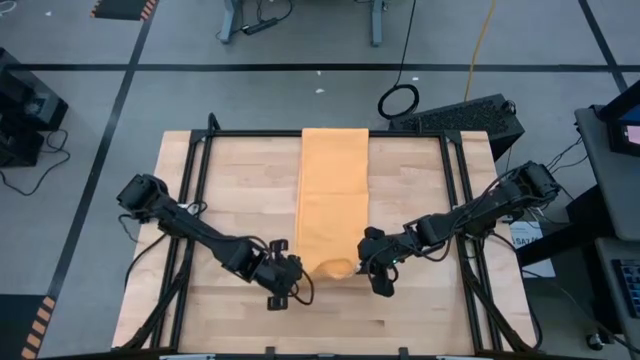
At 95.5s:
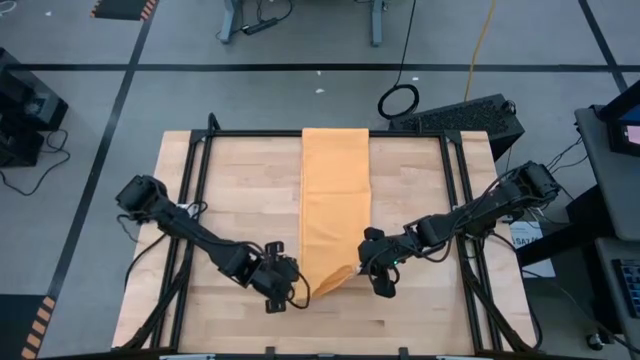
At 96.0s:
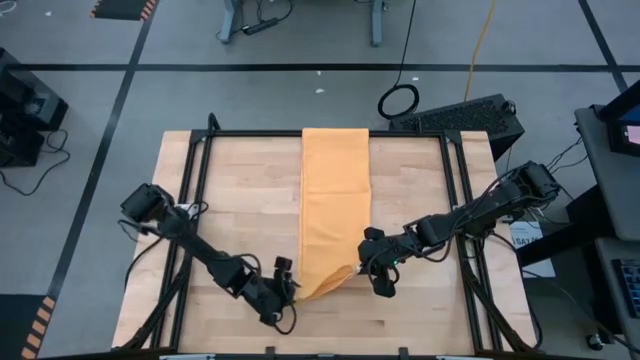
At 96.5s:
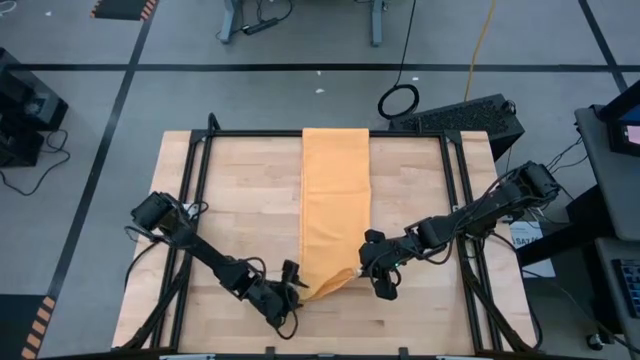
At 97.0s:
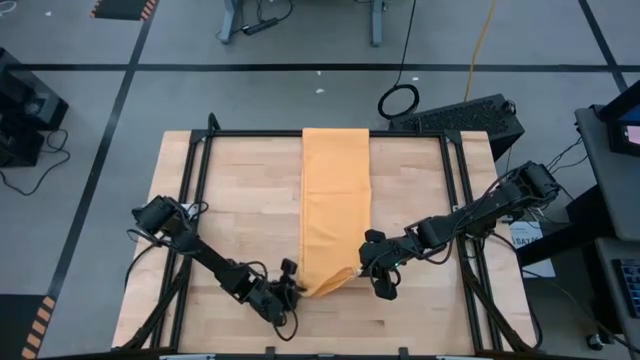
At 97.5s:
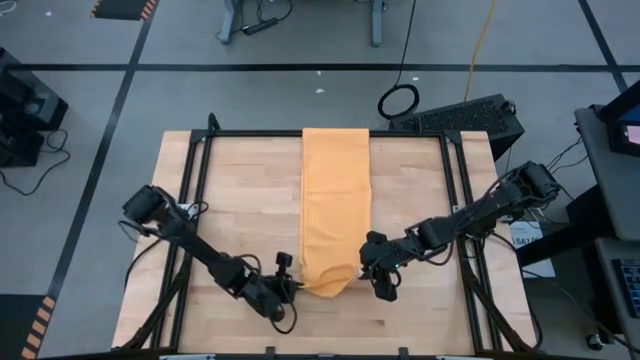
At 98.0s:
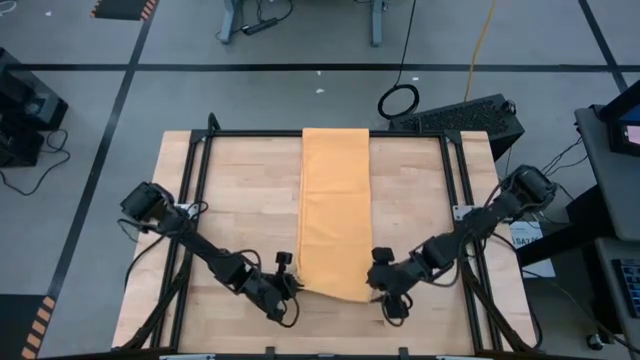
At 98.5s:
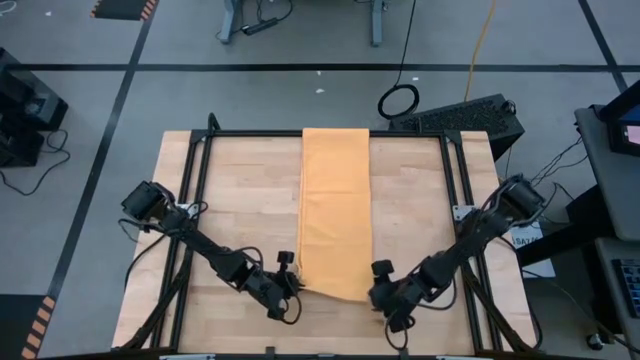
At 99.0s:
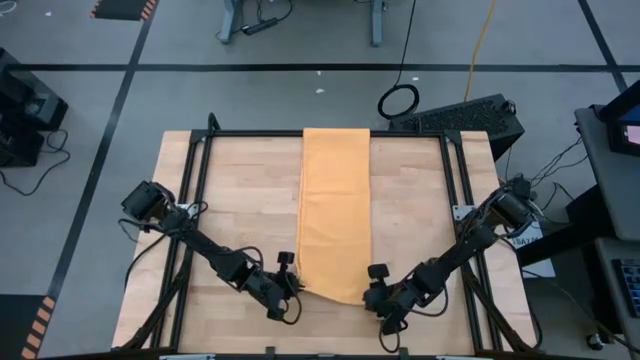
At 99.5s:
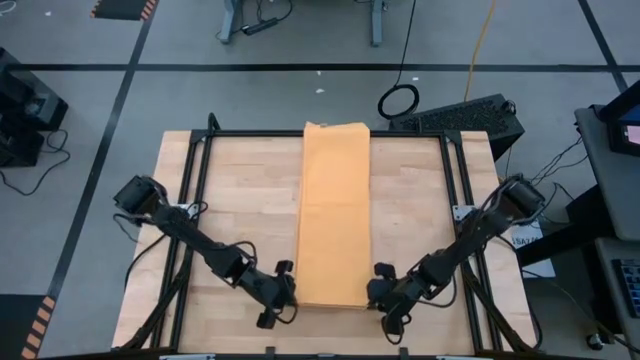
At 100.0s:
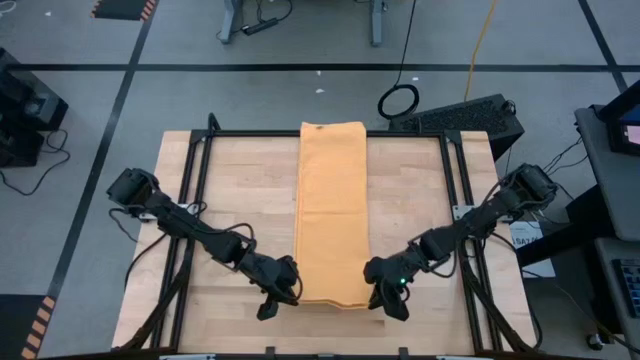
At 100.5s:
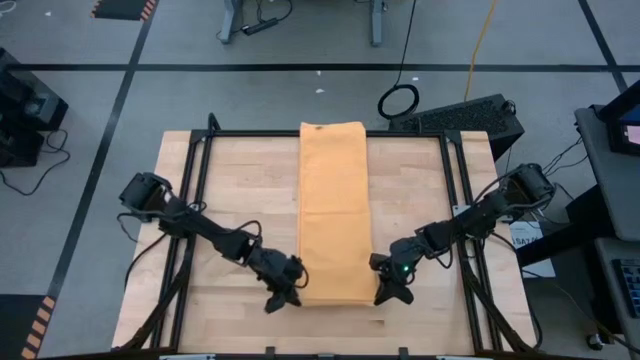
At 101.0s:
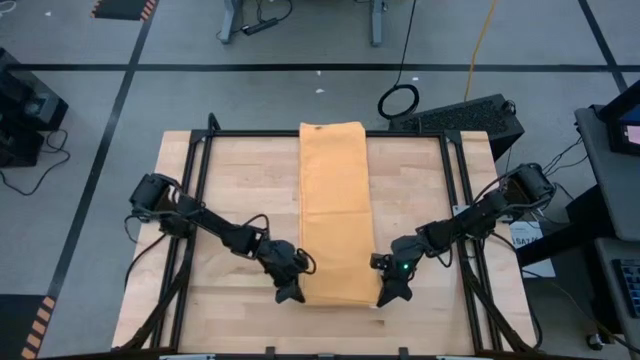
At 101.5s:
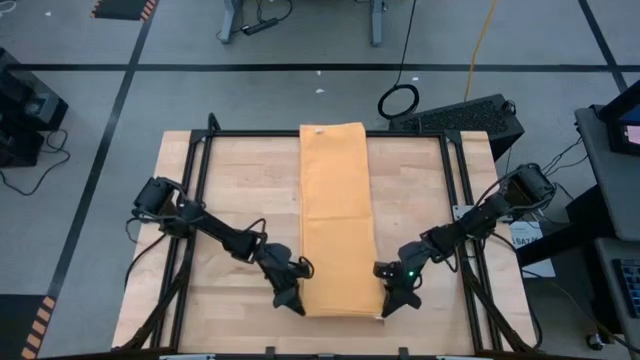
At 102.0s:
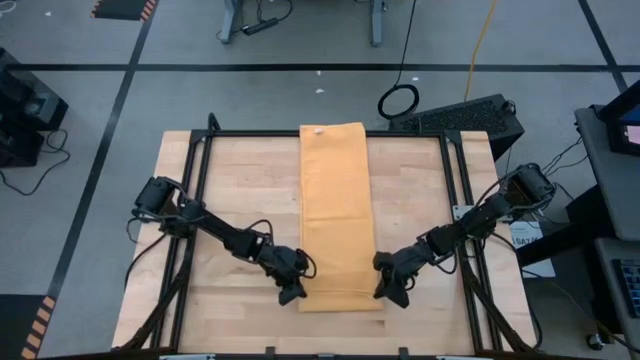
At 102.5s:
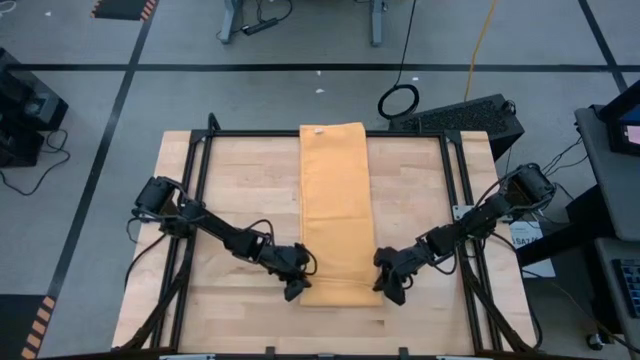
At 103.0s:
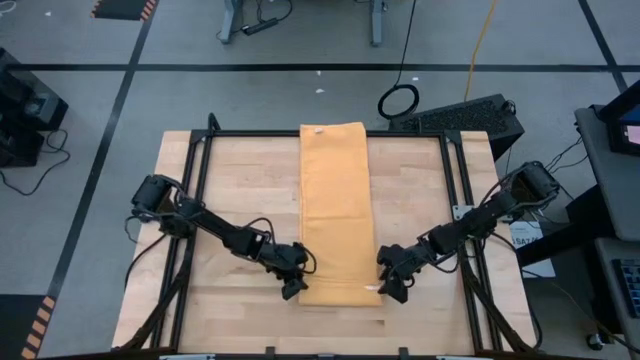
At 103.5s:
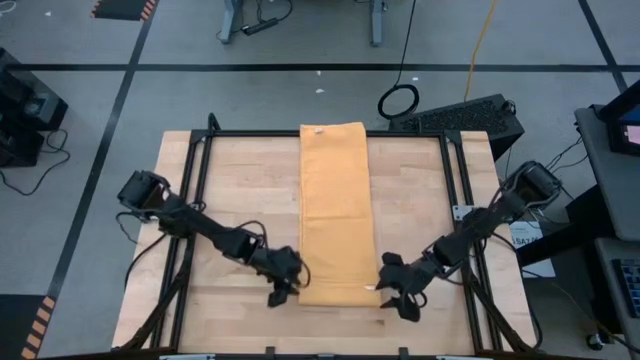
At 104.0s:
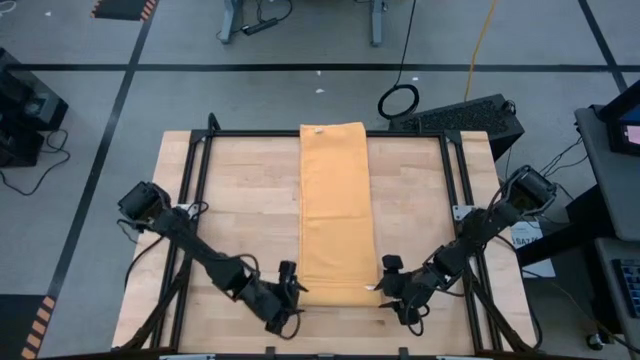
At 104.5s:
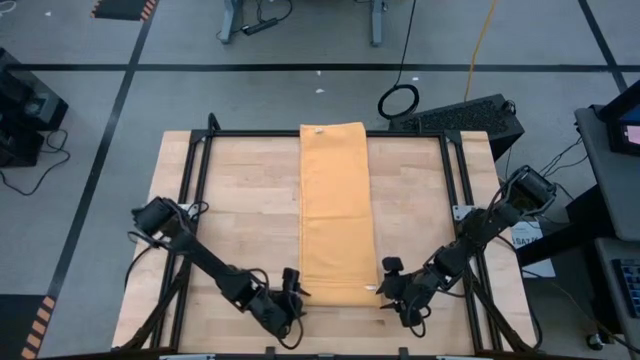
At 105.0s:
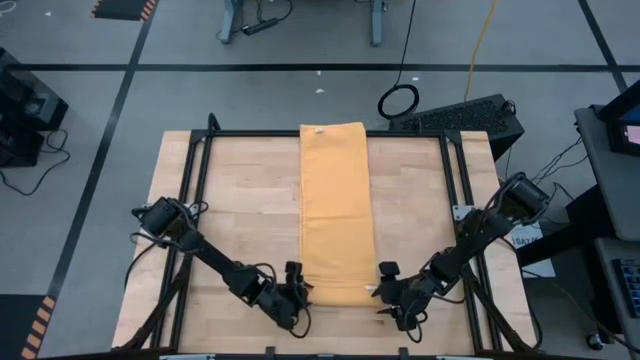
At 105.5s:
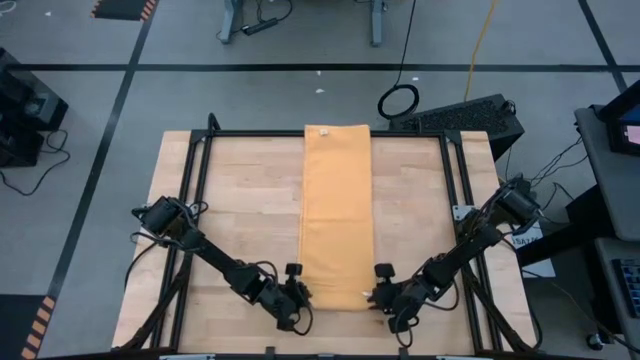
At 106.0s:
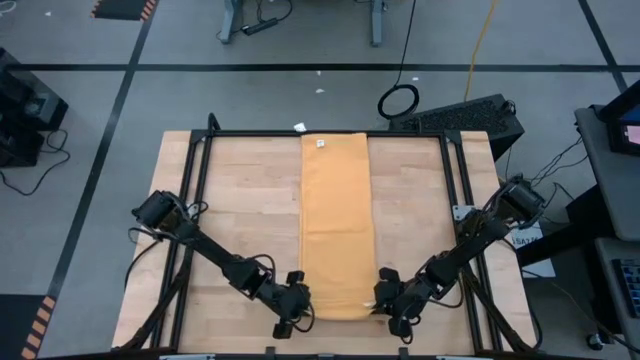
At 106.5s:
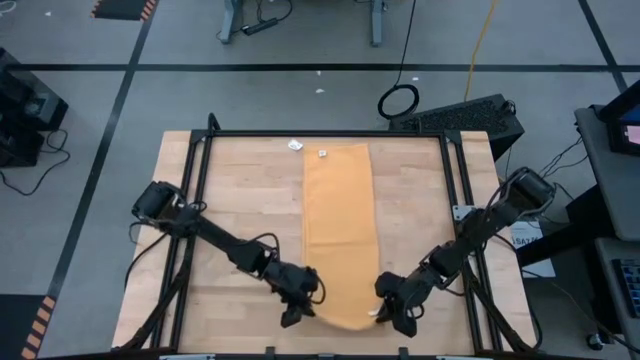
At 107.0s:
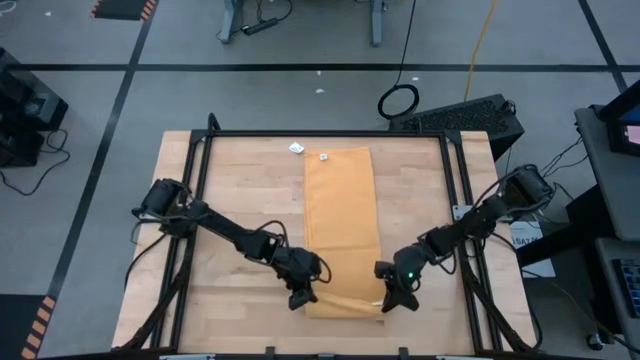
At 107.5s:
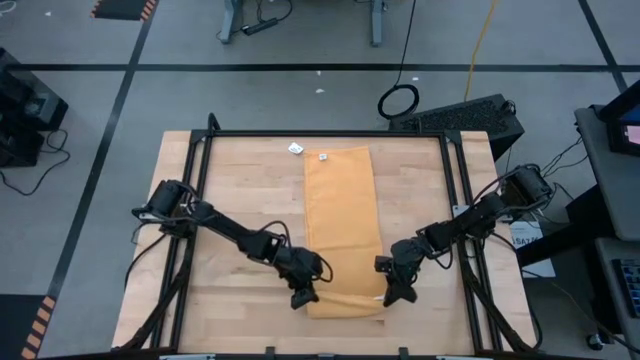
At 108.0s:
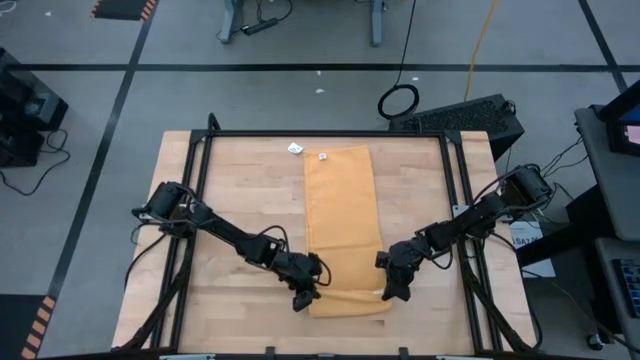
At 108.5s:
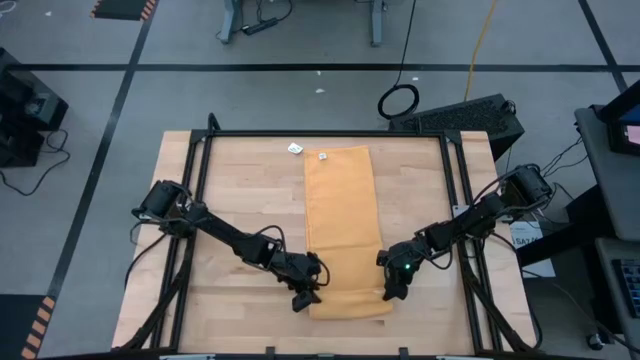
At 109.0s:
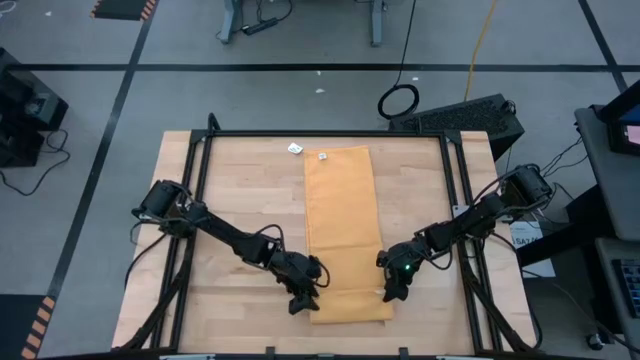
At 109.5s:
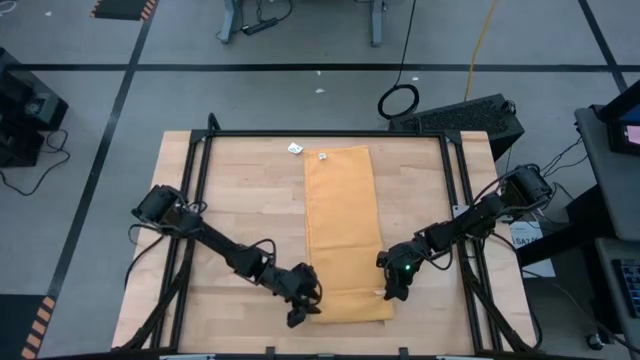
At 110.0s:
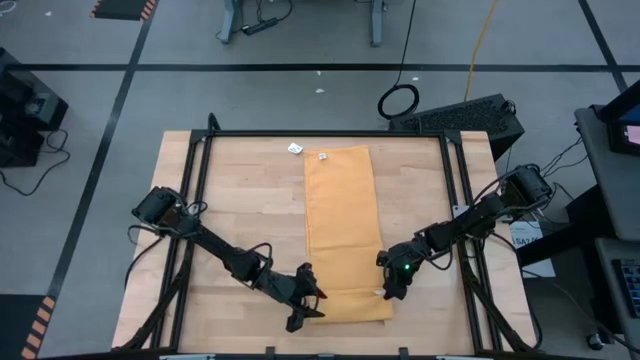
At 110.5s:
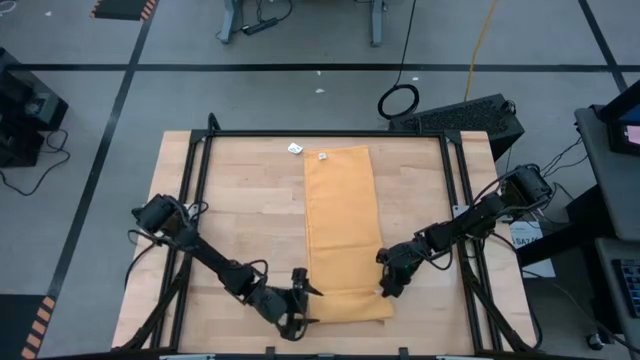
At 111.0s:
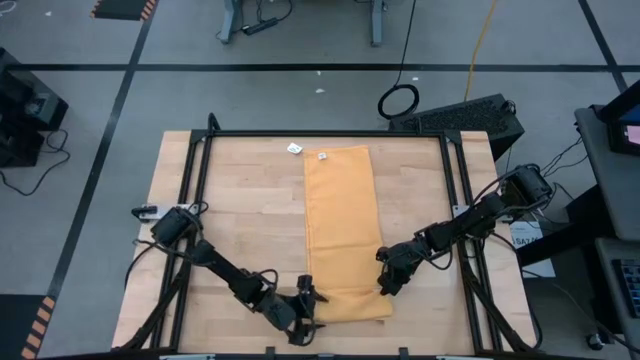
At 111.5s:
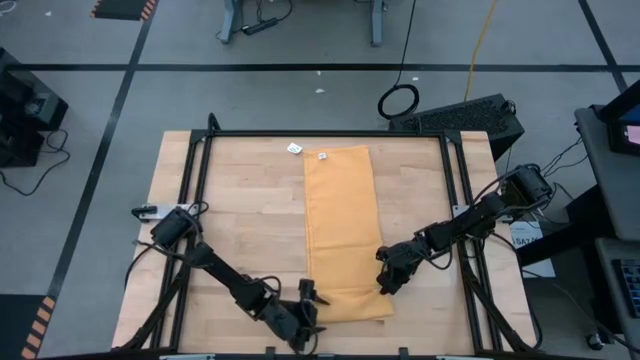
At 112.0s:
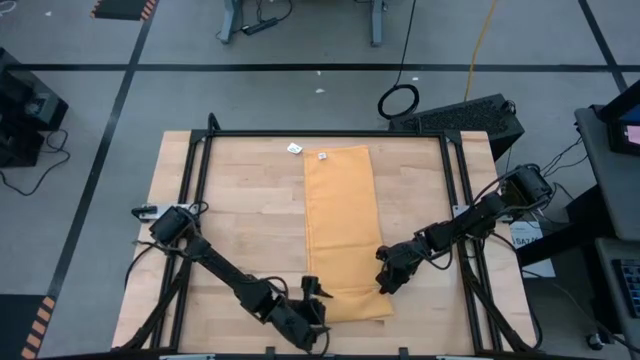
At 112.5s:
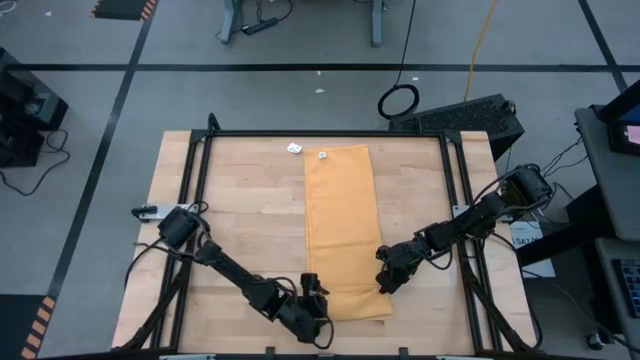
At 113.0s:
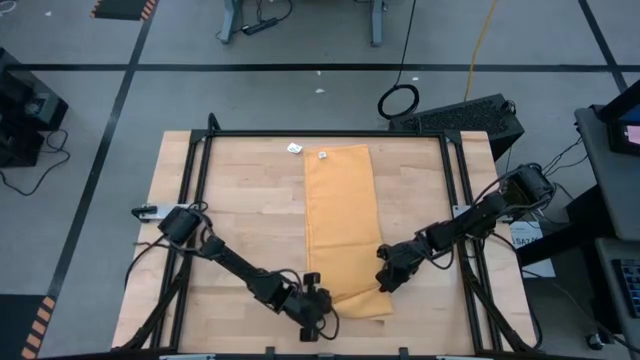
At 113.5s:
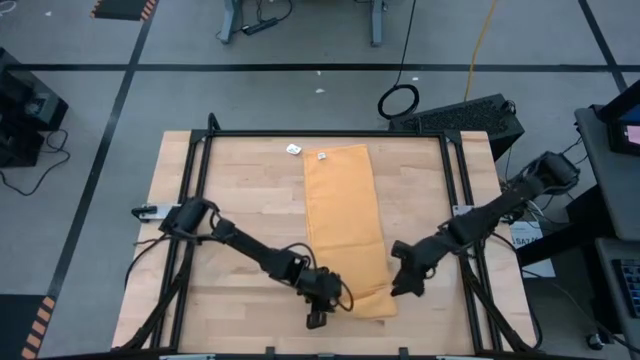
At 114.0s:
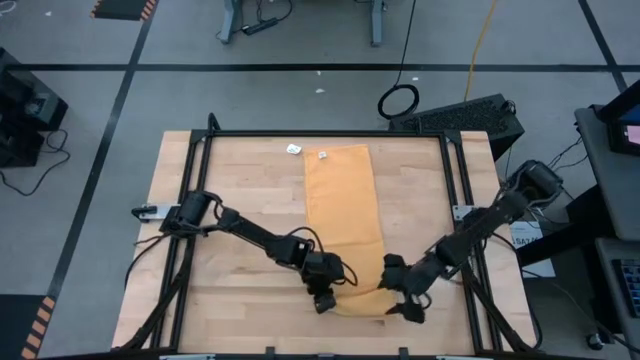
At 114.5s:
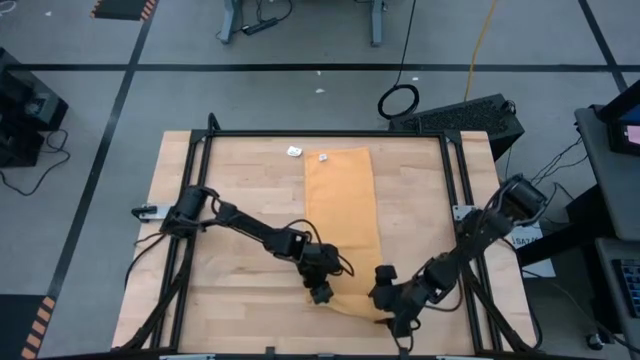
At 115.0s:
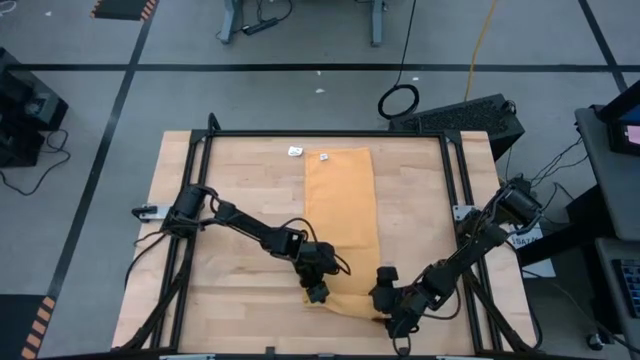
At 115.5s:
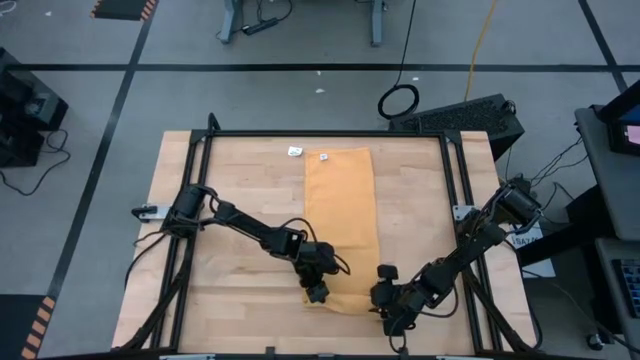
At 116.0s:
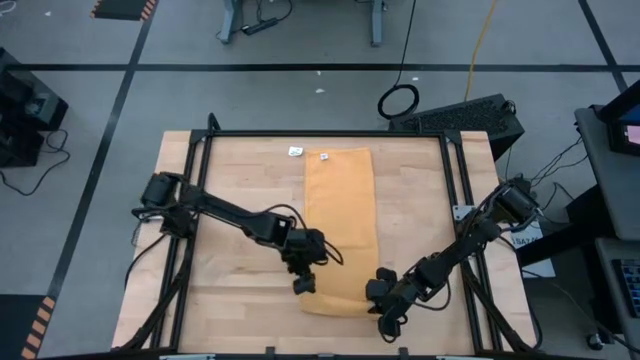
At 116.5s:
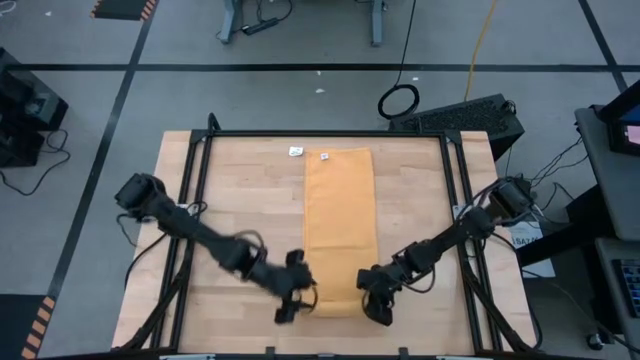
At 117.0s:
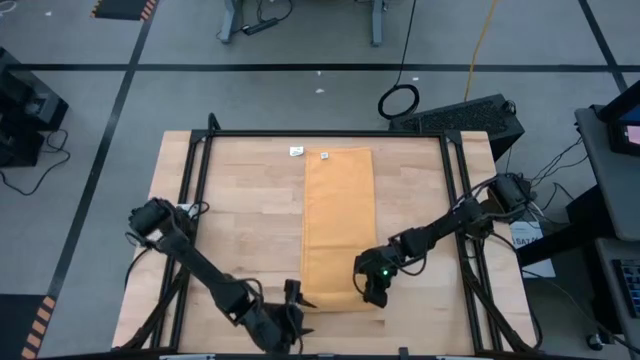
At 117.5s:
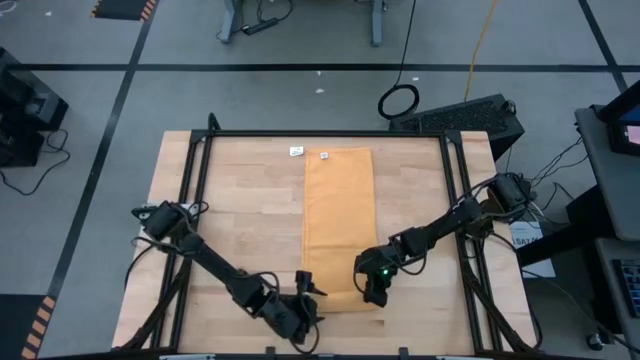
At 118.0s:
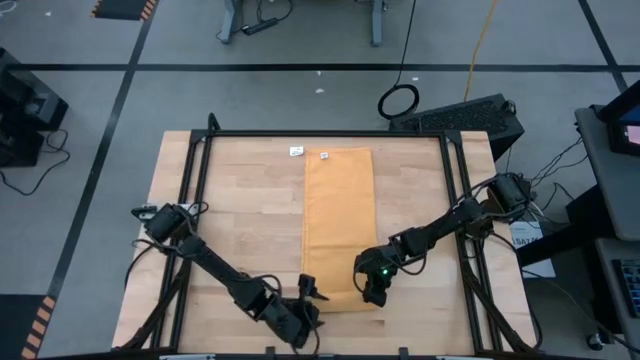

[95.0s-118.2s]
Task: Roll towel into tight, uniform cylinder
Roll the orange towel
